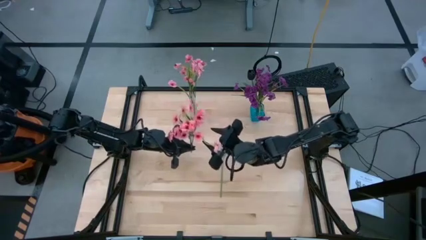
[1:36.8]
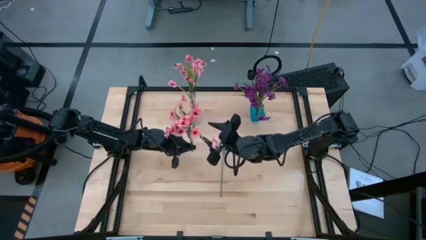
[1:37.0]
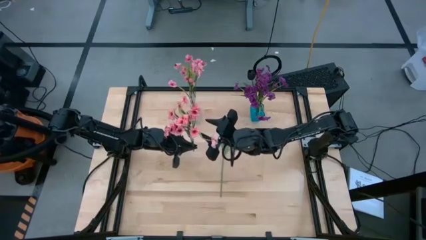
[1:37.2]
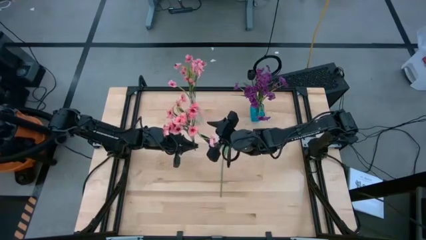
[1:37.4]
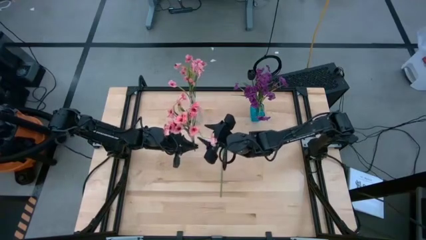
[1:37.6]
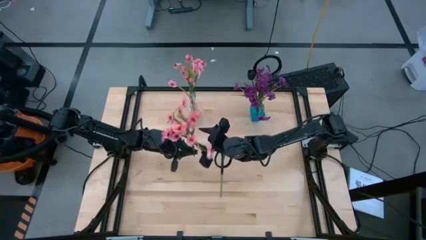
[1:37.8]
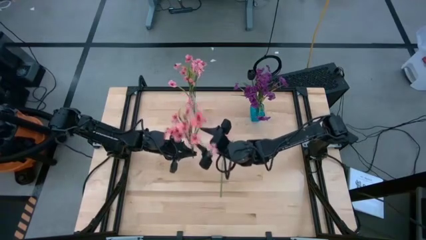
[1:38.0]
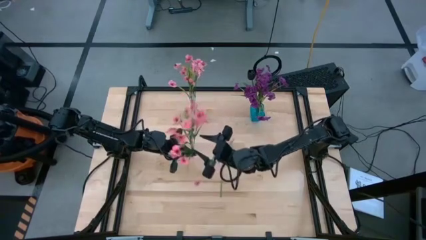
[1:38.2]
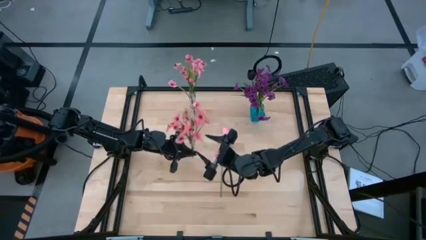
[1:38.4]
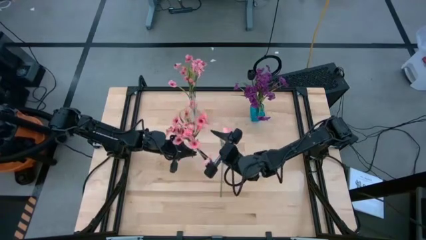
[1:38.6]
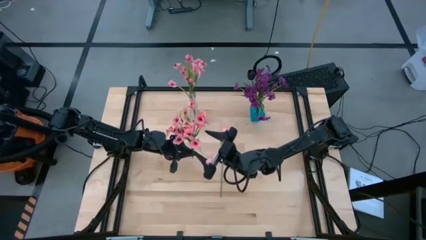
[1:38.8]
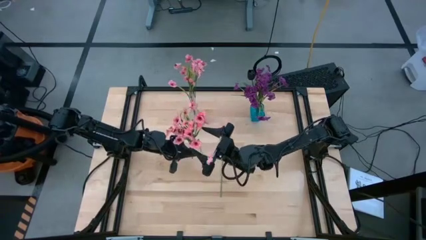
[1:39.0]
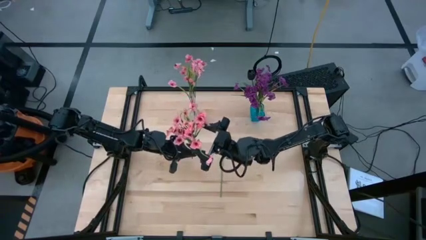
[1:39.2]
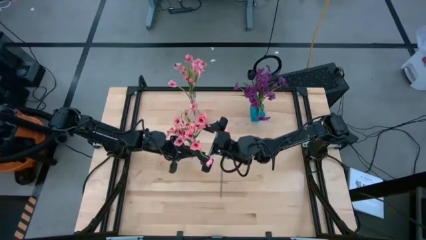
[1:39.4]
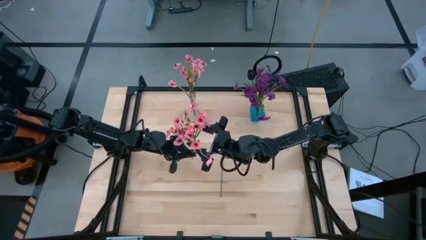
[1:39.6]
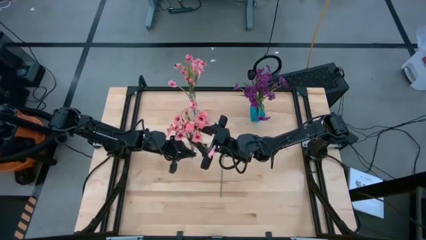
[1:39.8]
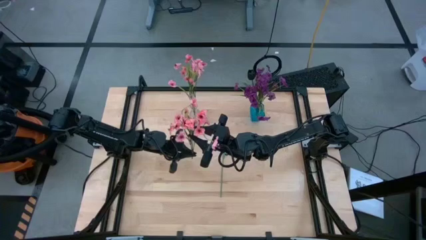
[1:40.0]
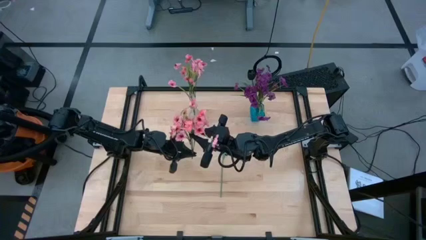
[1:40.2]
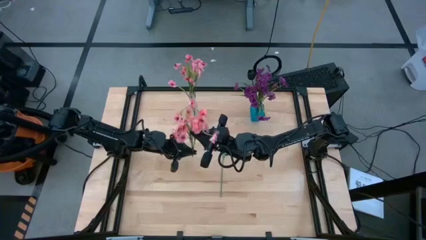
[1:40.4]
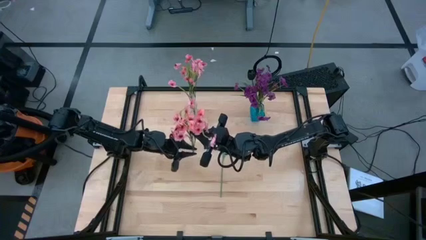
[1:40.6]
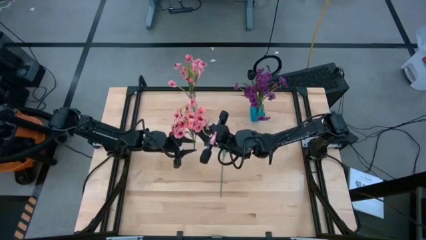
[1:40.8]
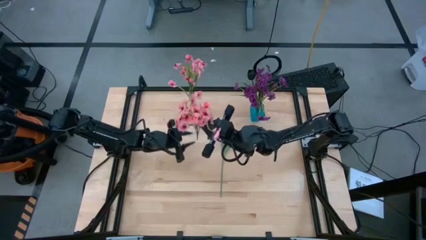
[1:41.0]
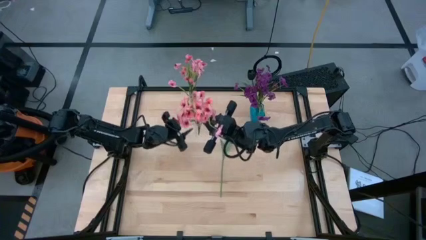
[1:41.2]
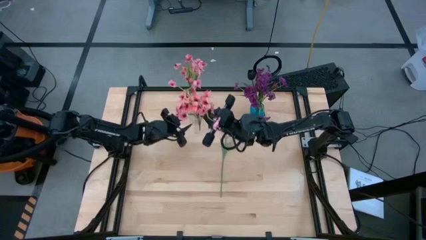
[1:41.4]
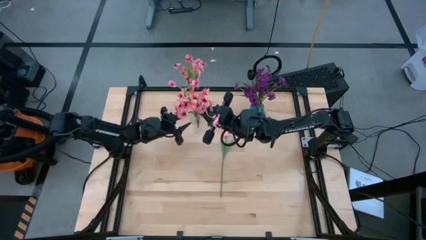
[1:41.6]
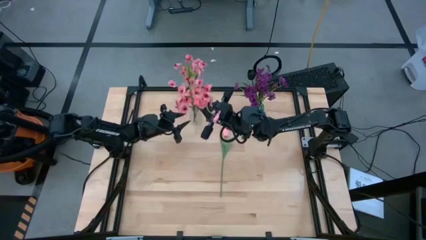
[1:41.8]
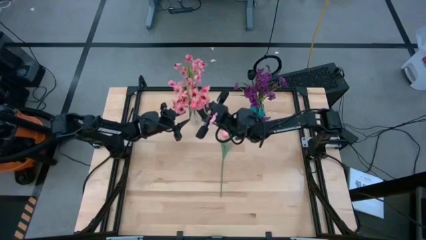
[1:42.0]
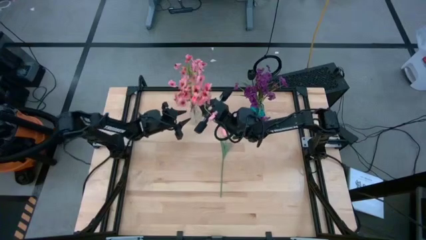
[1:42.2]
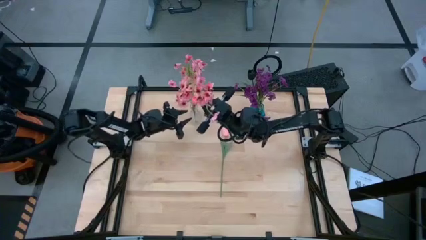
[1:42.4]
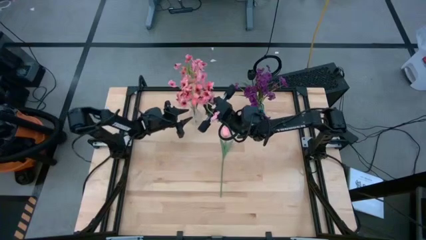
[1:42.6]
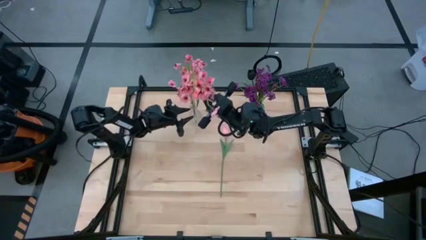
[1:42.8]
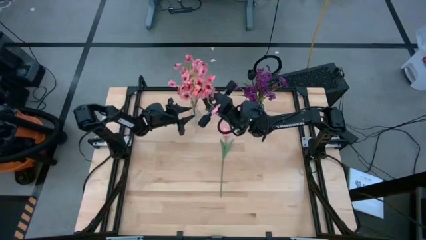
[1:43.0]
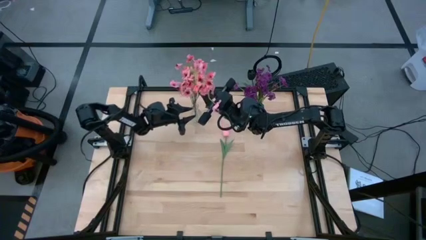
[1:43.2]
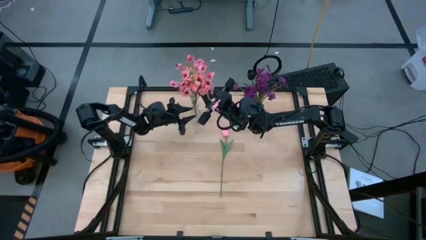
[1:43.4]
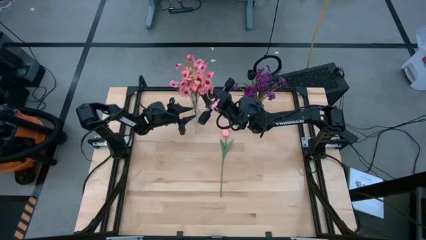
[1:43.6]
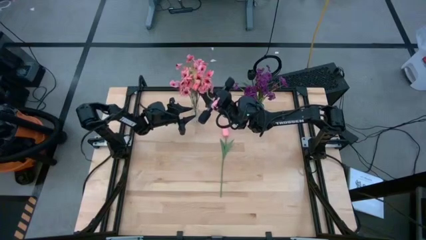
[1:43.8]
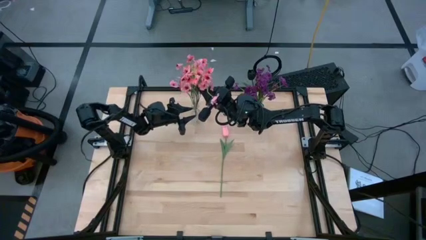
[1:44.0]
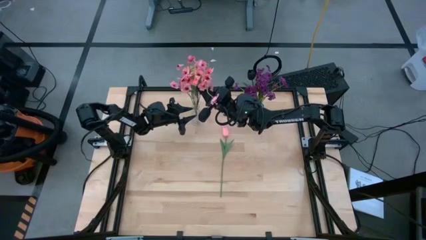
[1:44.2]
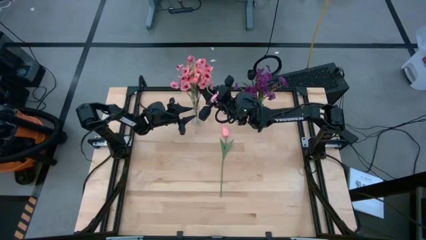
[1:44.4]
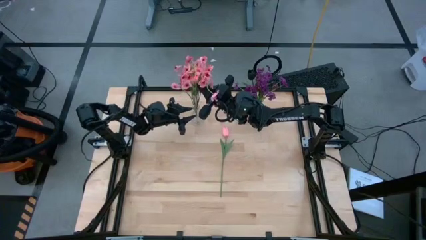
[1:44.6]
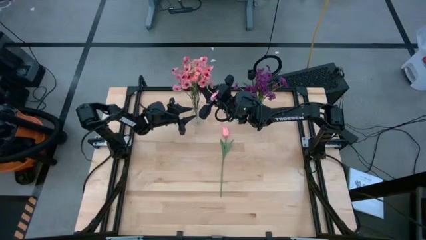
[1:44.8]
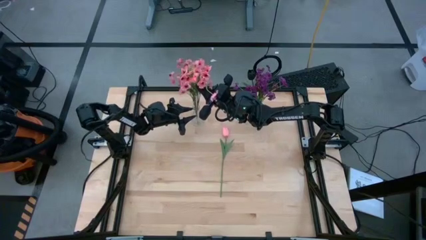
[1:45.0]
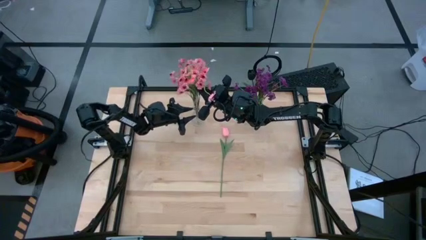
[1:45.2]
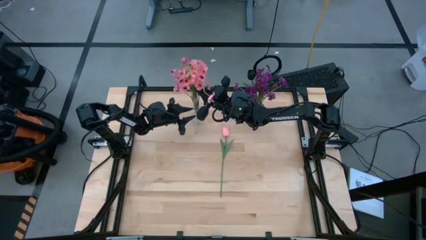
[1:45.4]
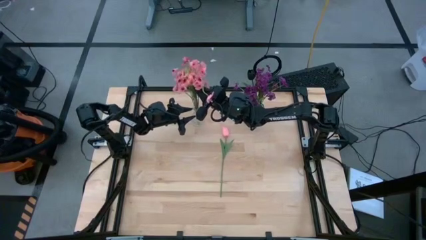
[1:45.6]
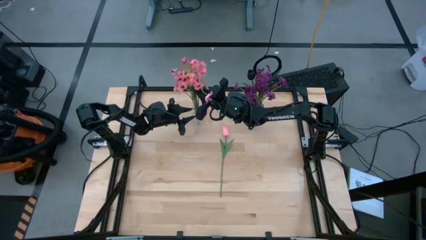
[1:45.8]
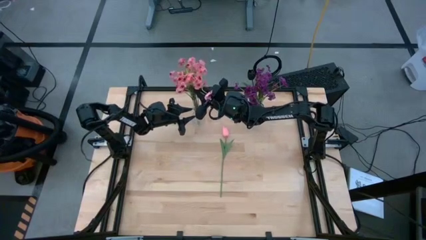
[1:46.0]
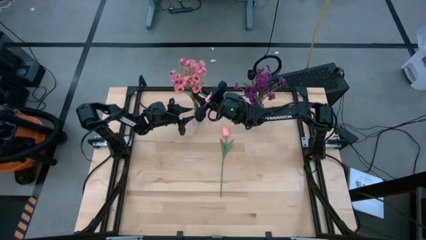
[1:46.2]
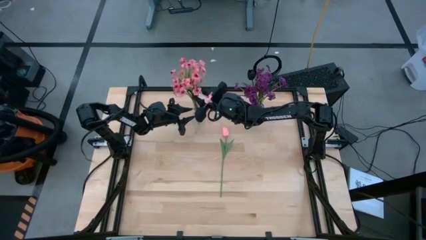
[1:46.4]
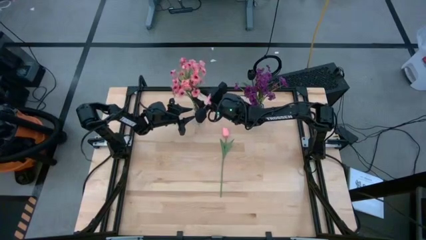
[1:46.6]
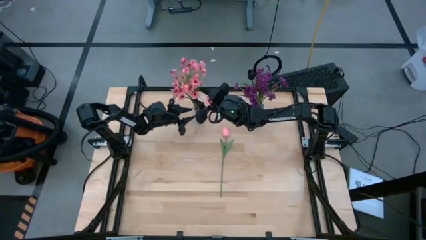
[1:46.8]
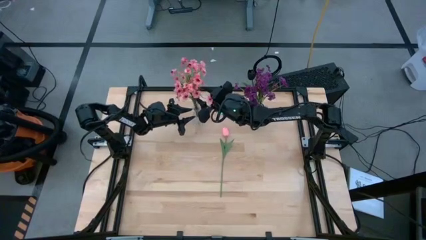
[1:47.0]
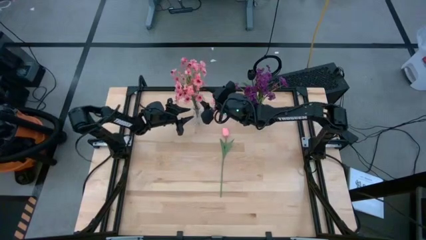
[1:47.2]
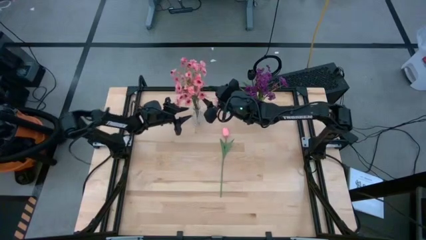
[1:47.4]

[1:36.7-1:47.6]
Task: Sort flowers into vase by color
Put the left pink flower into the transparent vase
